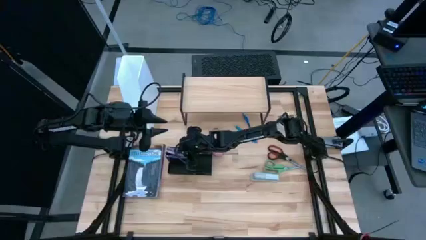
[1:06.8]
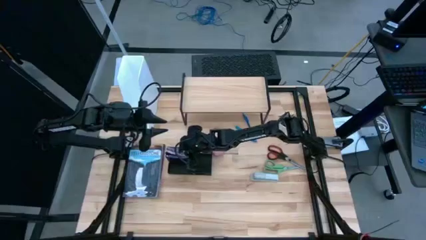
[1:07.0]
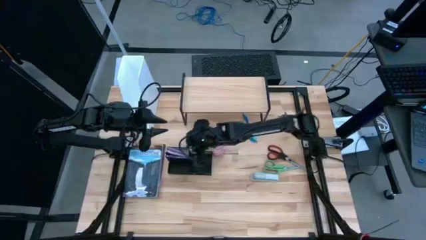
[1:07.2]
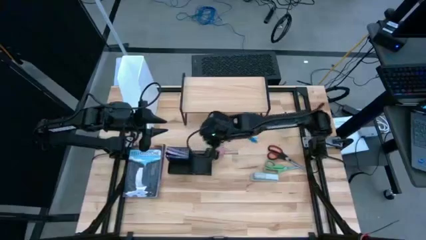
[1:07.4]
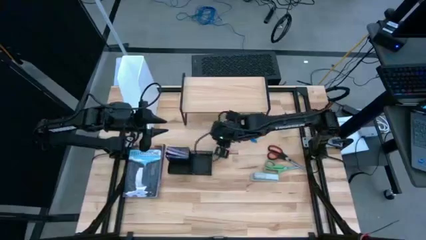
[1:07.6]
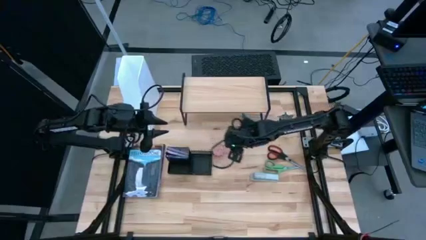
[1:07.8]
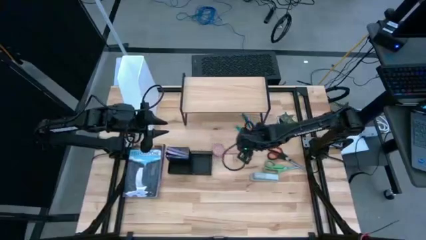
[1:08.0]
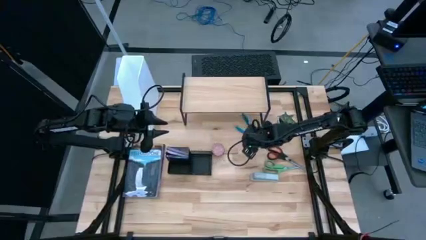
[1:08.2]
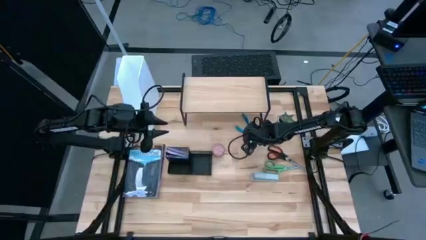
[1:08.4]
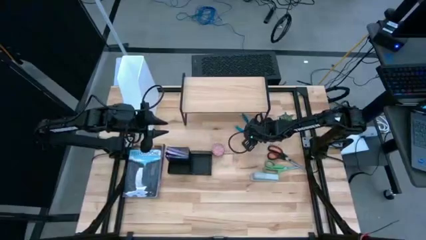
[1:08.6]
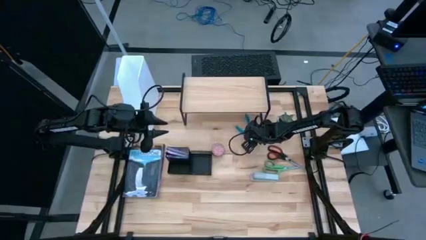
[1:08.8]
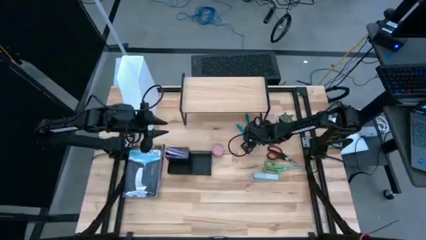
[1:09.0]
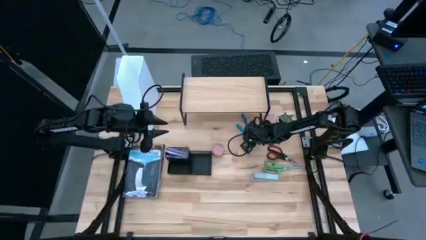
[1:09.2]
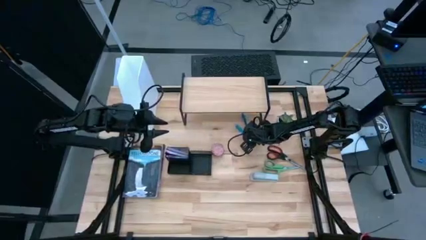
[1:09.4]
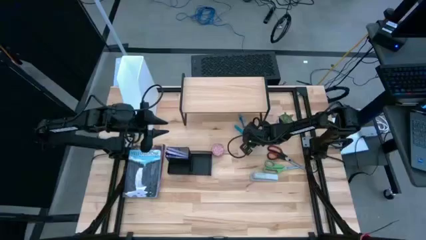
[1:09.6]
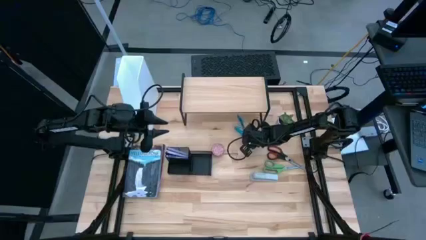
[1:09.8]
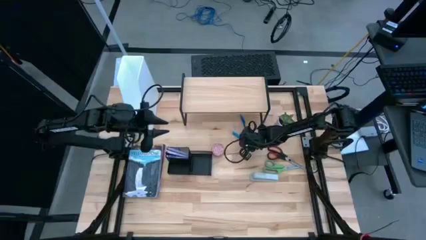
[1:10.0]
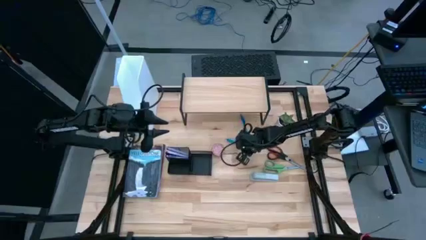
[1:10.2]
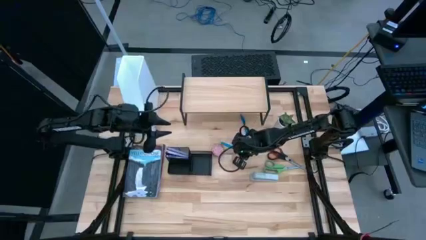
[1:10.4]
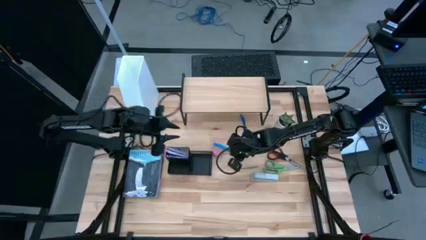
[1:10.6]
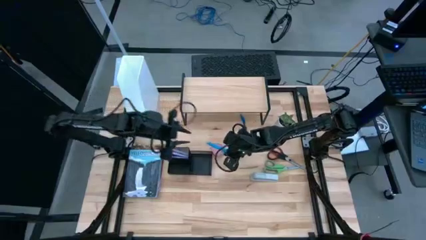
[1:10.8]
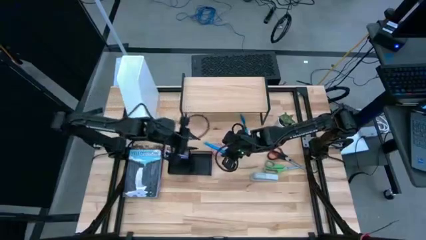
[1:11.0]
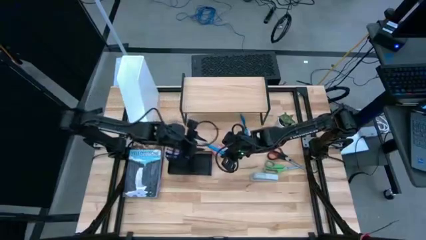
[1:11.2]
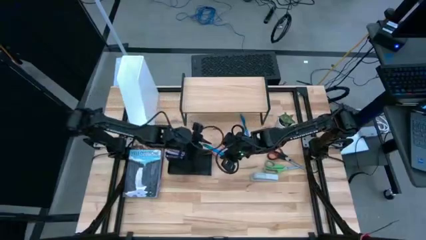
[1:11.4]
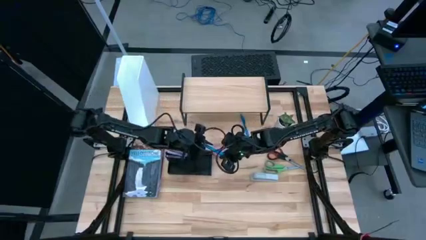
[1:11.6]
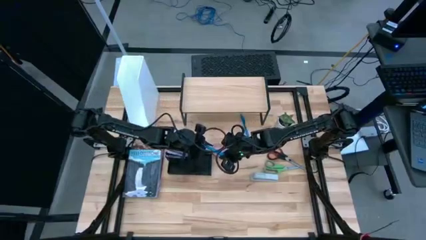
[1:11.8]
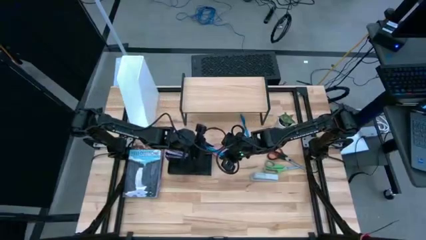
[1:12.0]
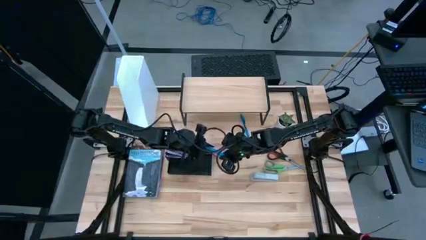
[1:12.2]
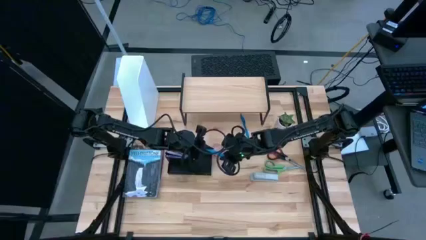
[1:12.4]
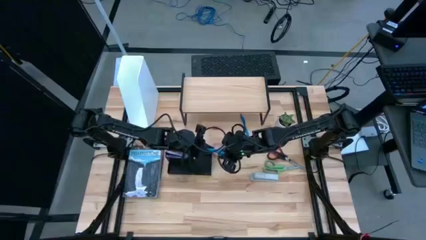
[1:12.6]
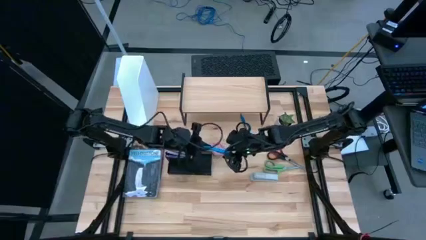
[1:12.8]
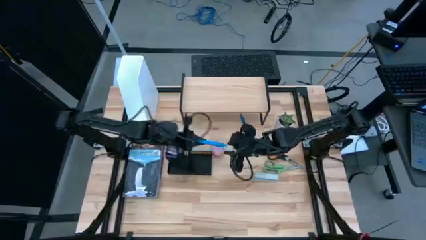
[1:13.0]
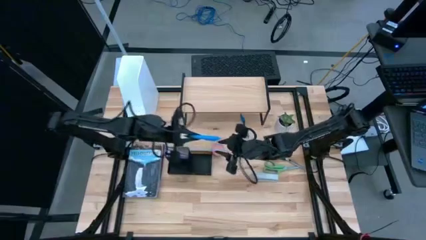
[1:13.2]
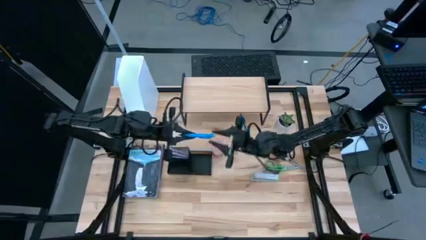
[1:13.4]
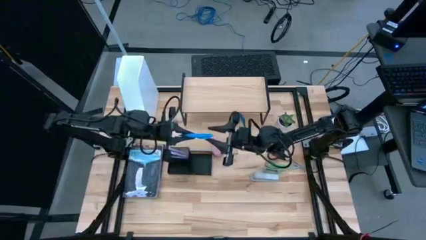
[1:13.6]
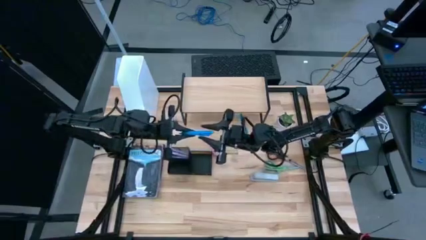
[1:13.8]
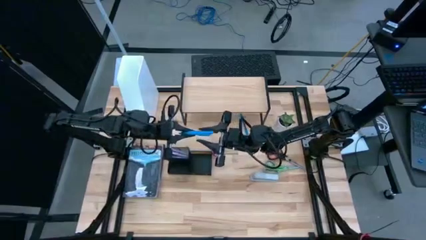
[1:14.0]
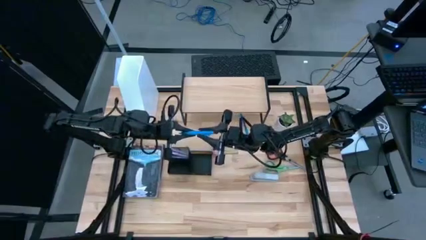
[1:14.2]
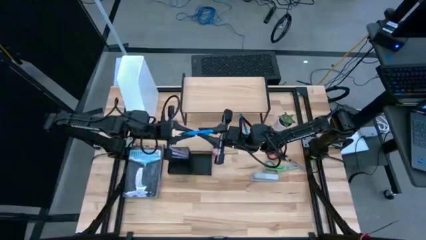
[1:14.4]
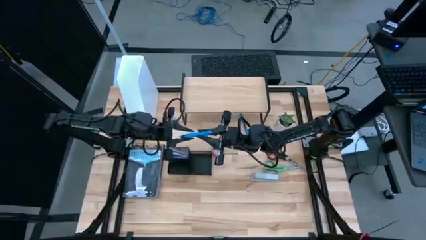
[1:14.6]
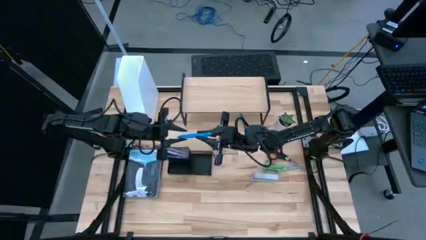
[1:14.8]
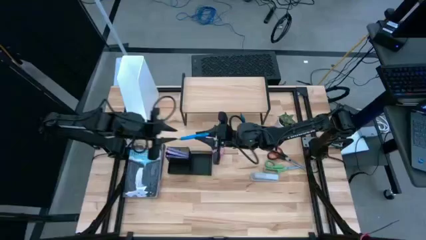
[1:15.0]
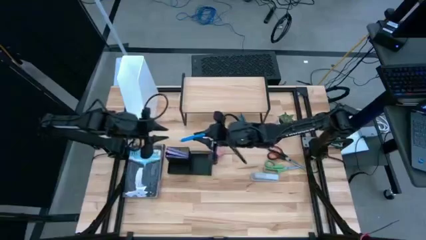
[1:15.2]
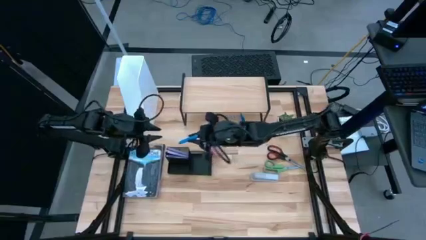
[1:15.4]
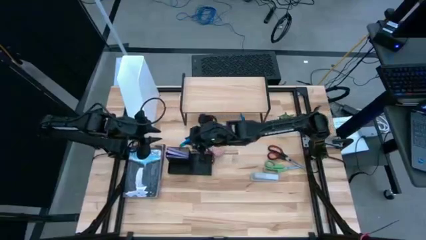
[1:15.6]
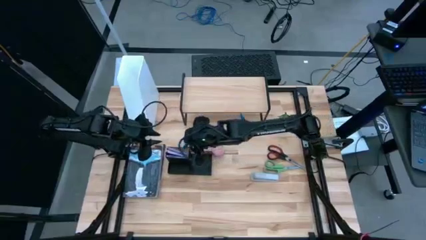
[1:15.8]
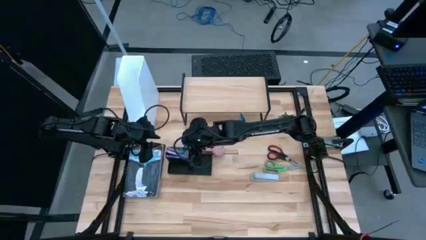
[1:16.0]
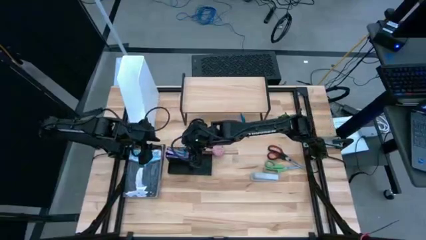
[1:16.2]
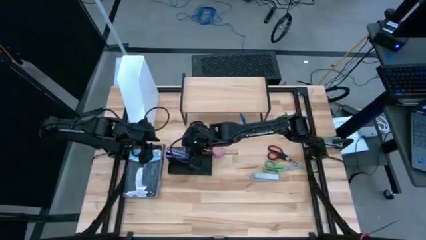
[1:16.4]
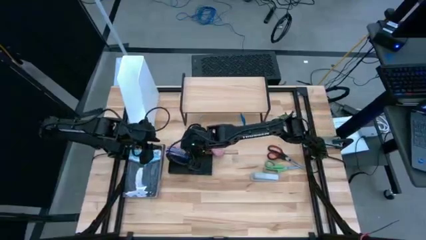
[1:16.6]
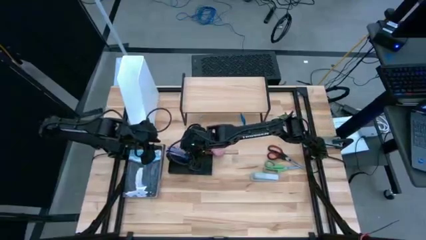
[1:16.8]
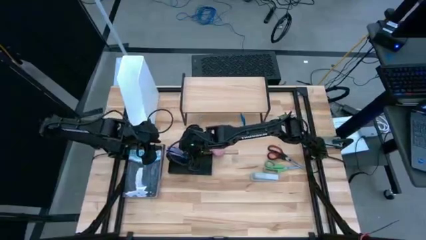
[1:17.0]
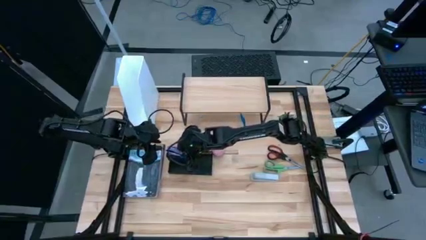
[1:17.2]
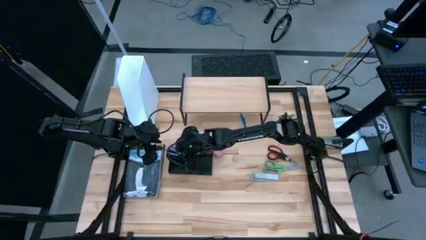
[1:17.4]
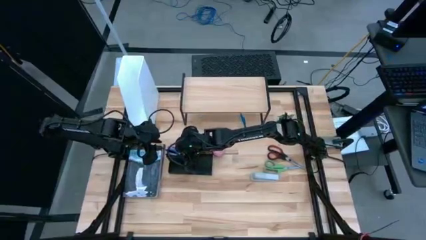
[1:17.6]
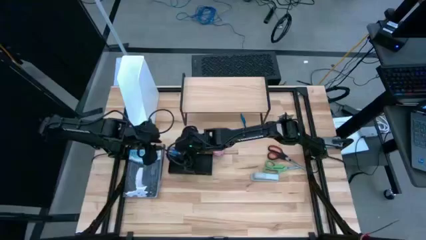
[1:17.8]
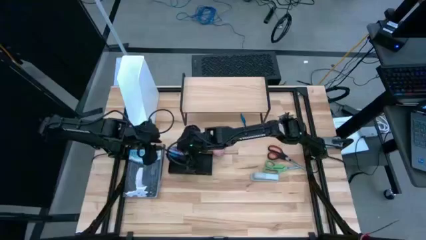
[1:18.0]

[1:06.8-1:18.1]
Task: Stock shelves
Put the blue pen into the desk organizer

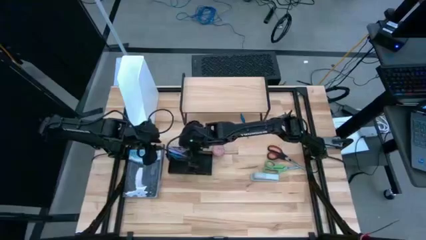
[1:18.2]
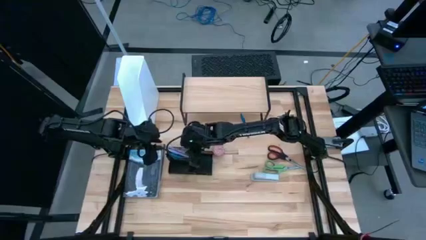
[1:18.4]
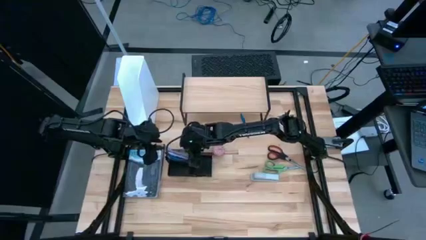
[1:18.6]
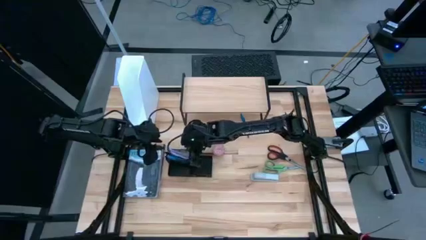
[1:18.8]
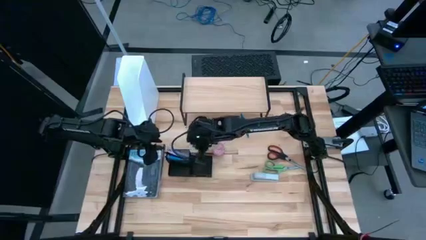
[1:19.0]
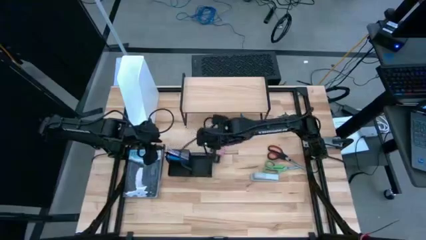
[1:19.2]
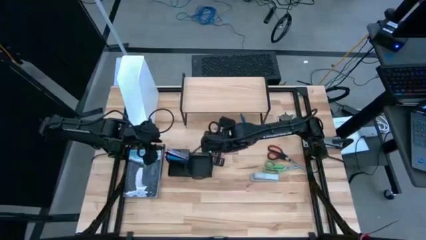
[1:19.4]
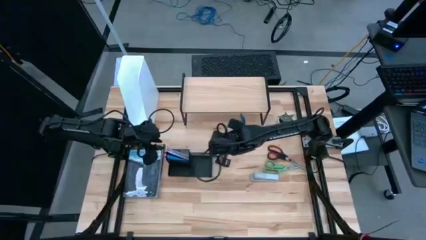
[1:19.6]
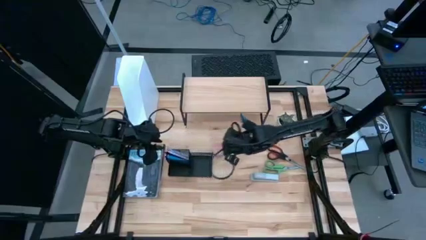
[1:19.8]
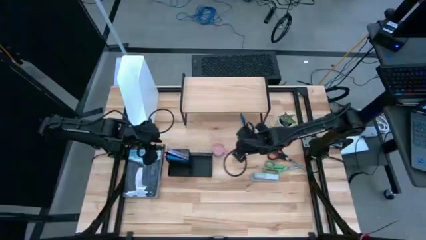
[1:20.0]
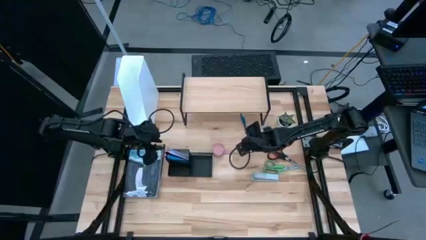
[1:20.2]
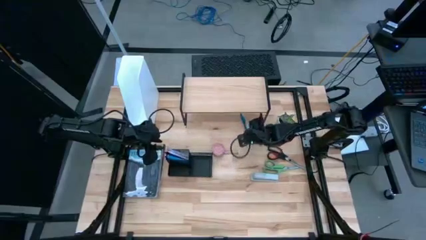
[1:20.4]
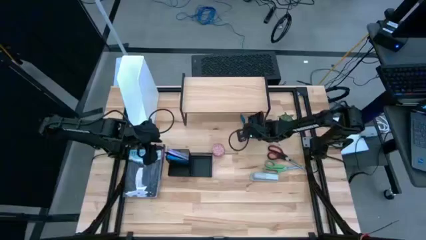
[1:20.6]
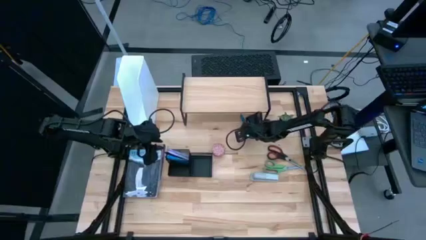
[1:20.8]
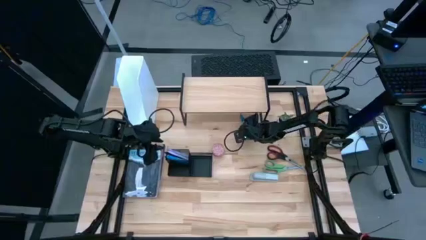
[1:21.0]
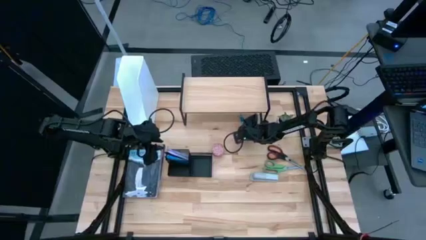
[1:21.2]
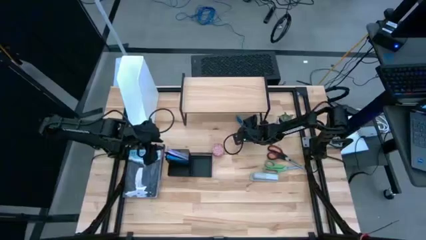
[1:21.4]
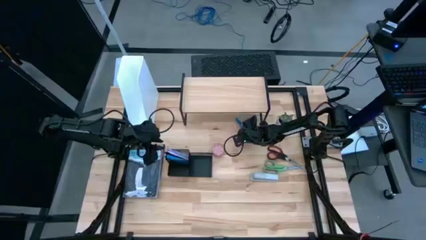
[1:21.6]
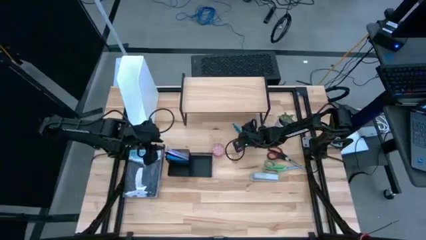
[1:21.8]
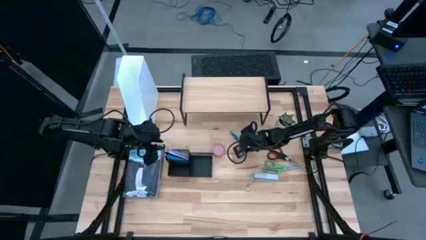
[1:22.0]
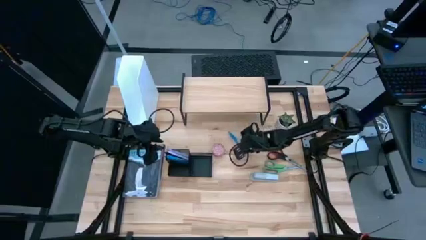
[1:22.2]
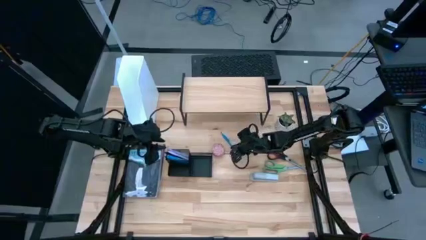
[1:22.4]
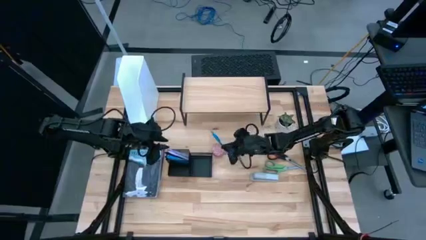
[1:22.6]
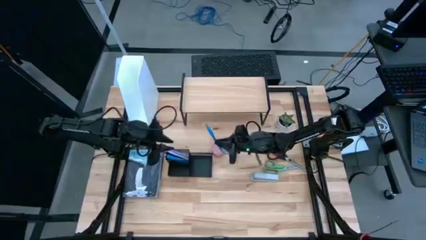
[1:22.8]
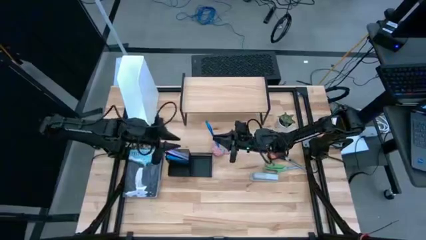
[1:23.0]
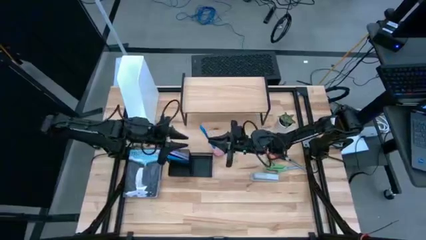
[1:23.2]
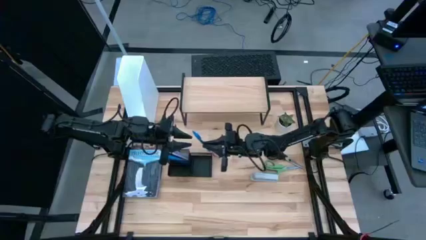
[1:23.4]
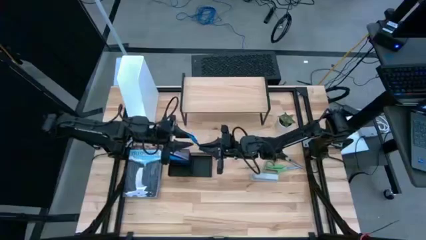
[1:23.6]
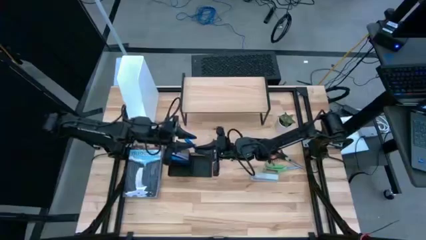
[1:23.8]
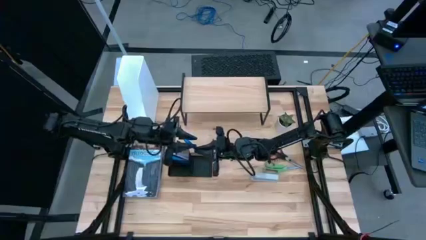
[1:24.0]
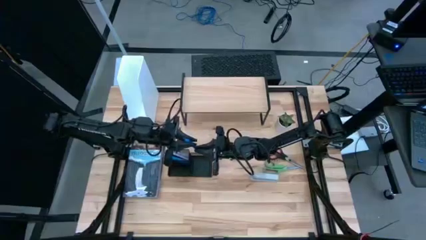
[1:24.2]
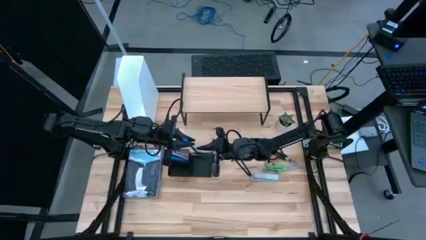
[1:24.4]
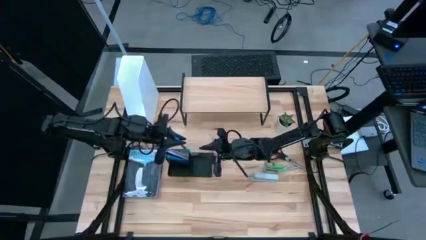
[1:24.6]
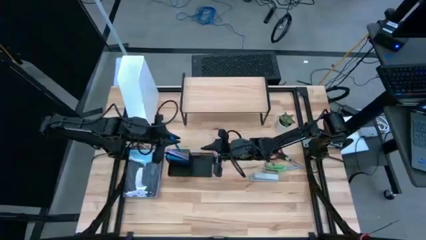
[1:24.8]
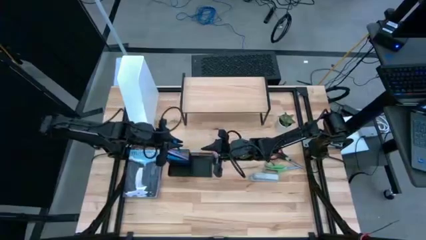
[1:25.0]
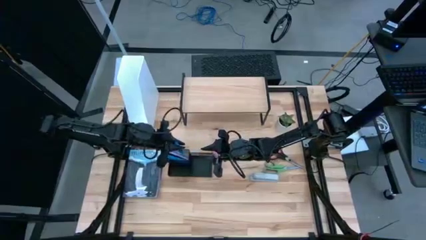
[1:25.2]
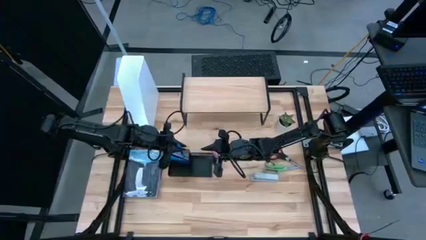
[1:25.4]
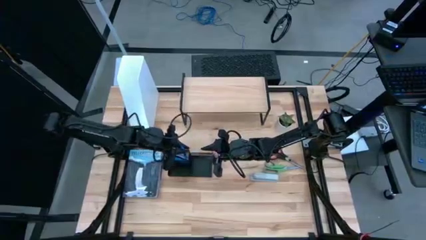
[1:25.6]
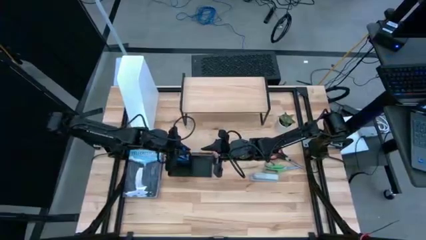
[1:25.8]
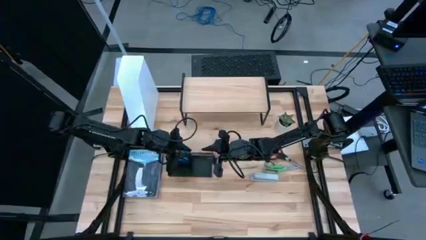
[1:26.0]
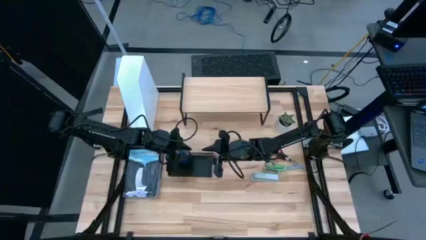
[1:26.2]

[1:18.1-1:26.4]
Put the blue pen into the desk organizer
